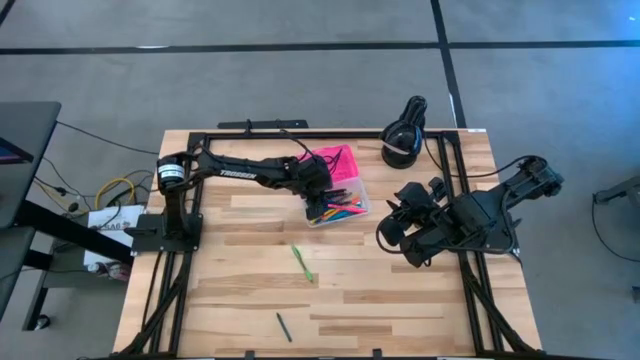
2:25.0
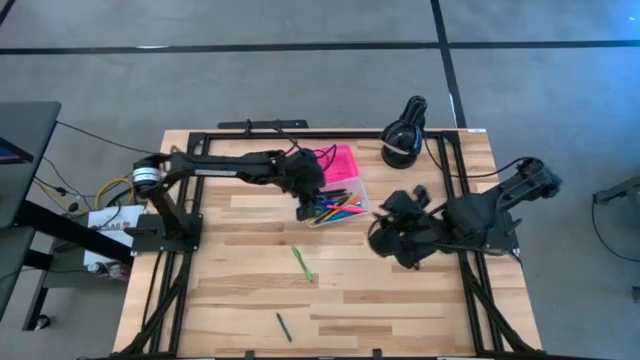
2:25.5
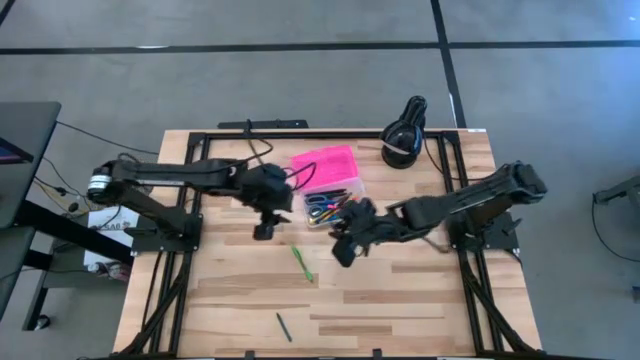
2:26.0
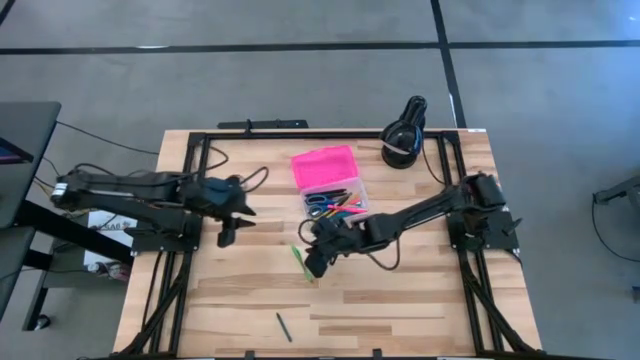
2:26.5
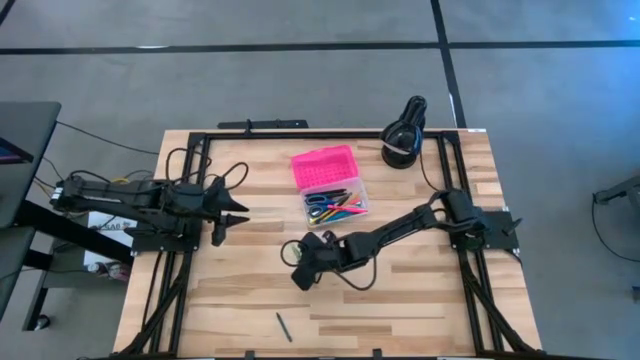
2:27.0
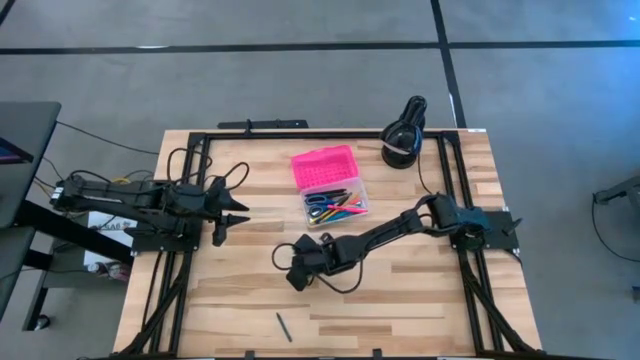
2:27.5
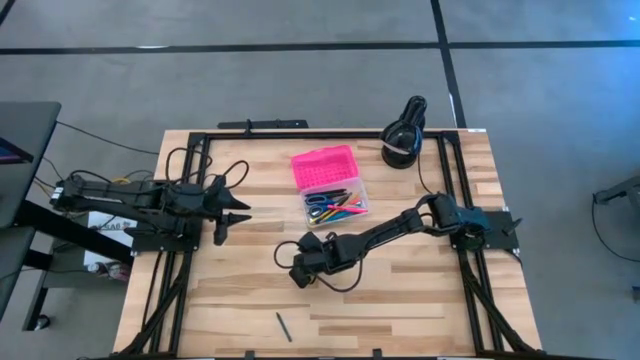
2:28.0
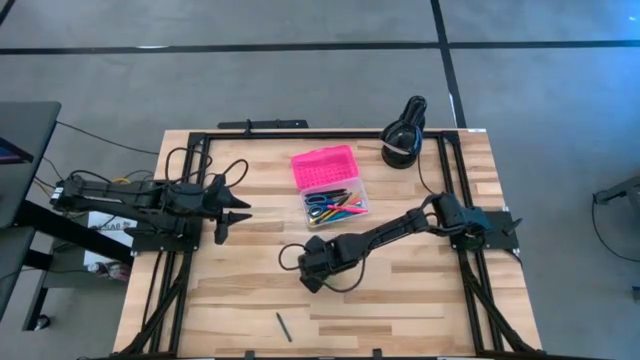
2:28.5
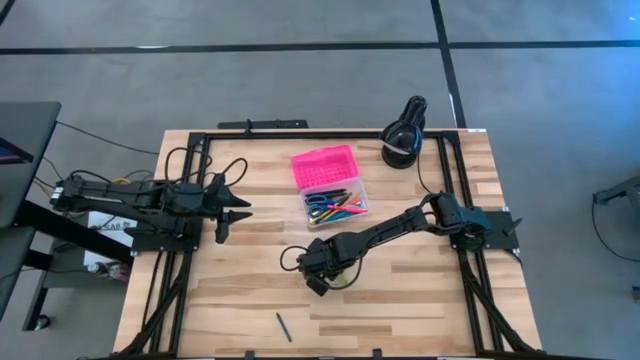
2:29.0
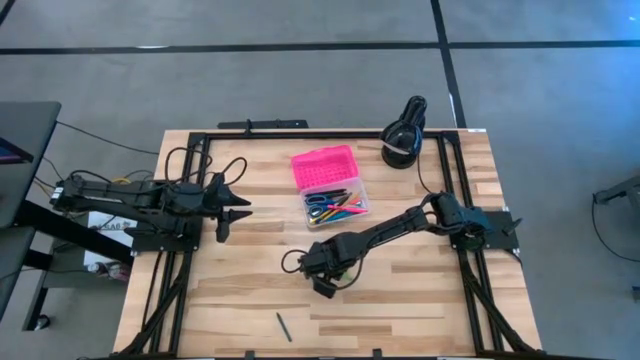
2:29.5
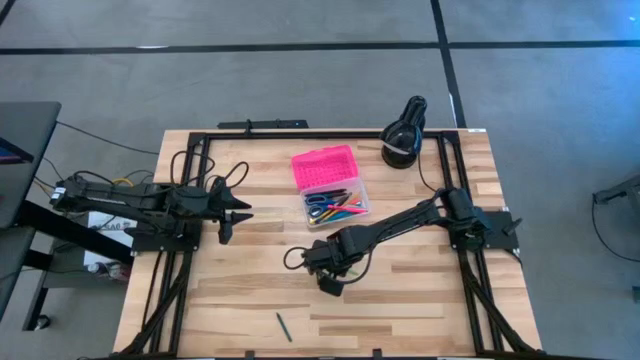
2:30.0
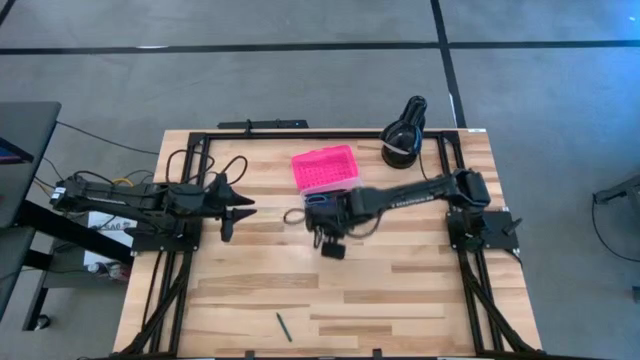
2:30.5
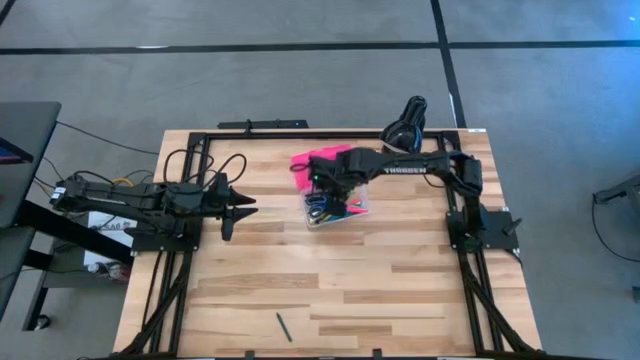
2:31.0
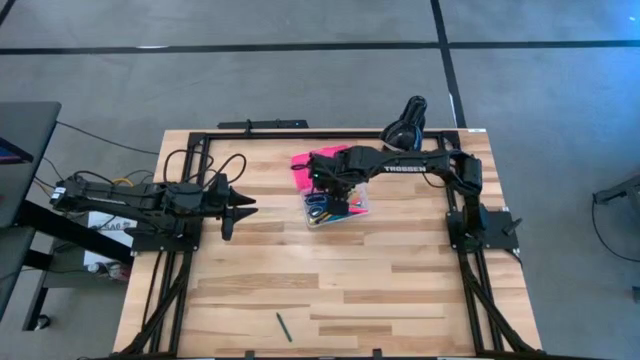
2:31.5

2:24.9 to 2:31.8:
Task: Pick & place school supplies into a supply box
Put the green pen into the pink supply box

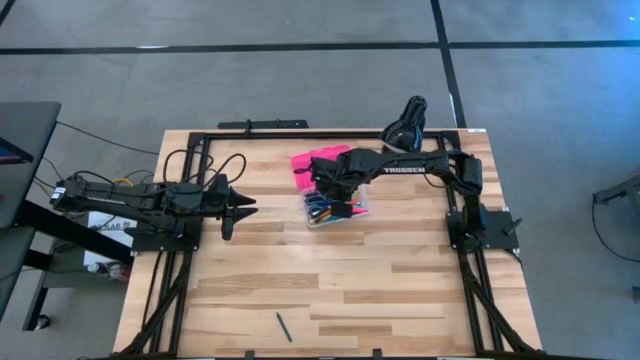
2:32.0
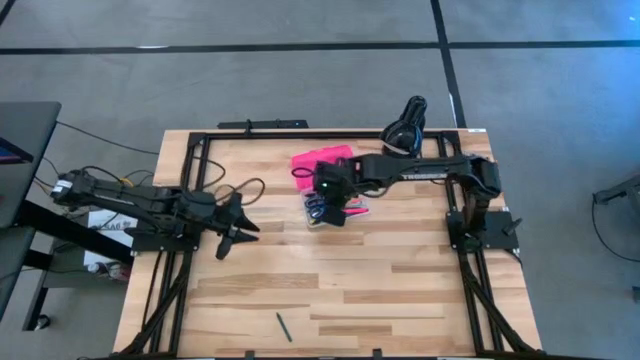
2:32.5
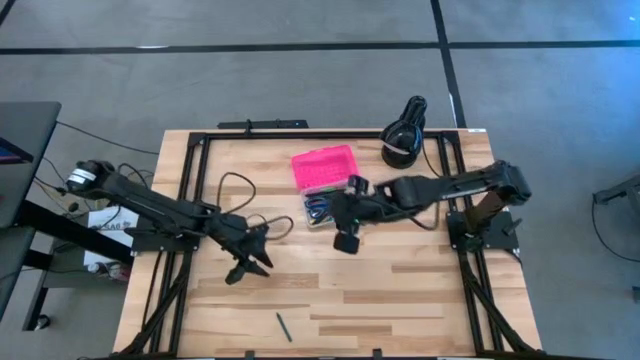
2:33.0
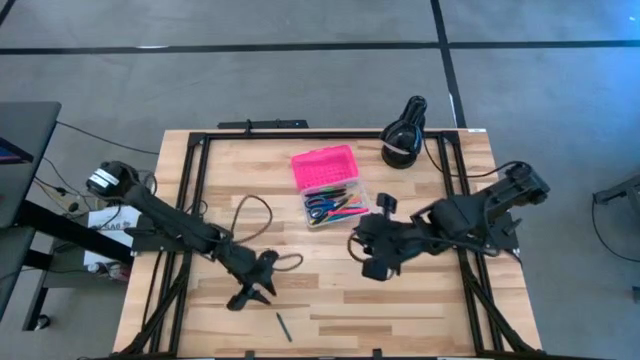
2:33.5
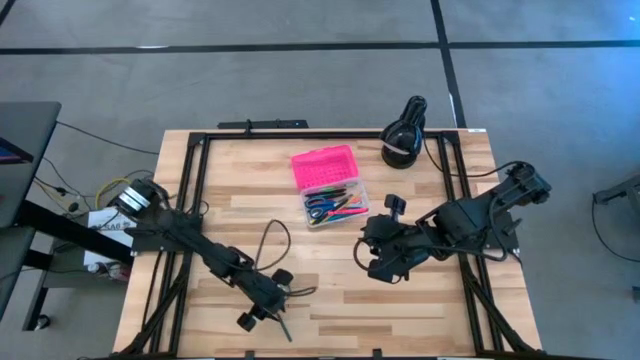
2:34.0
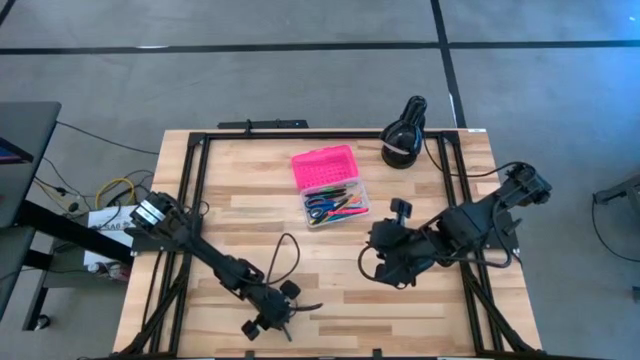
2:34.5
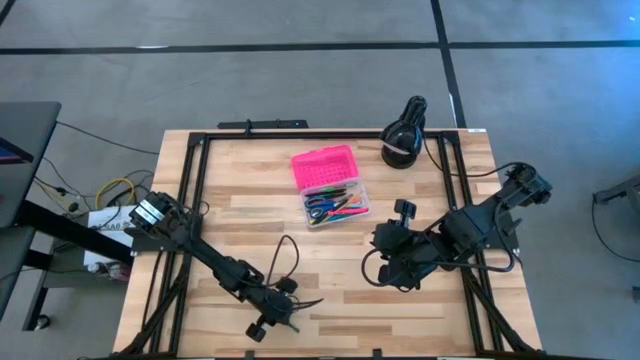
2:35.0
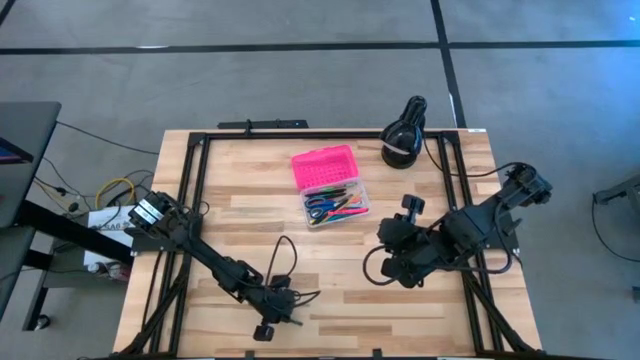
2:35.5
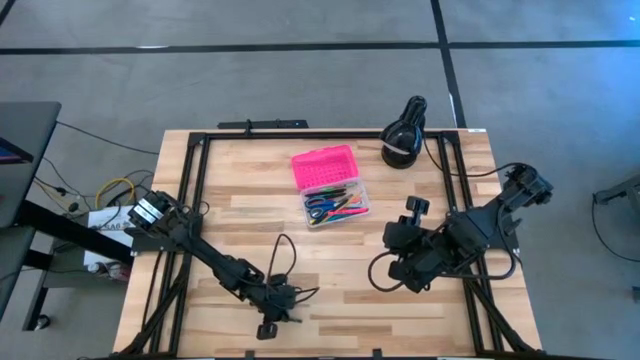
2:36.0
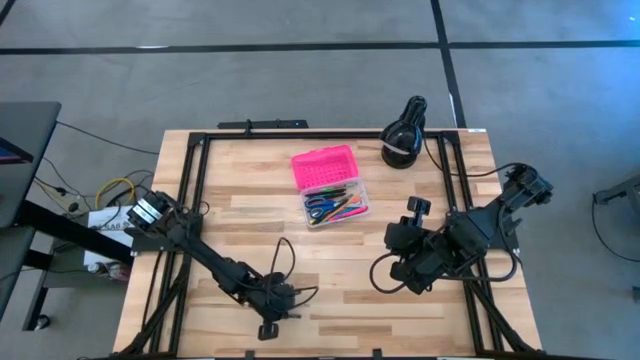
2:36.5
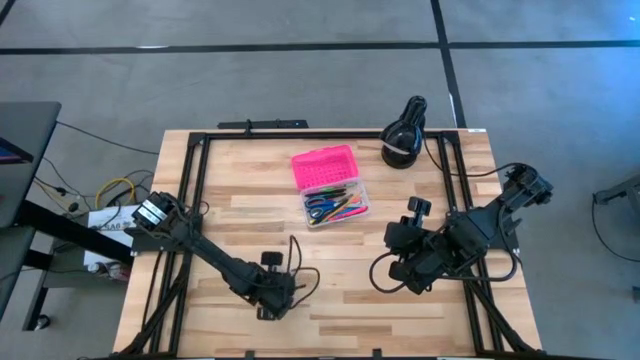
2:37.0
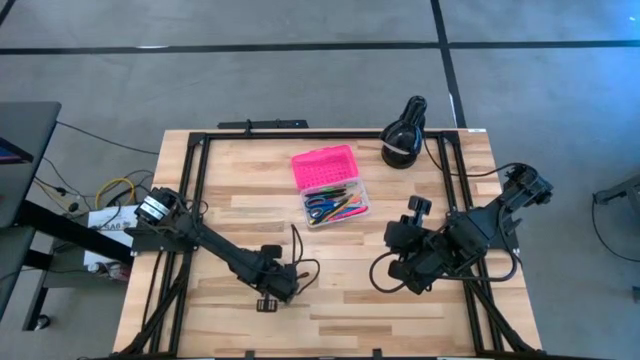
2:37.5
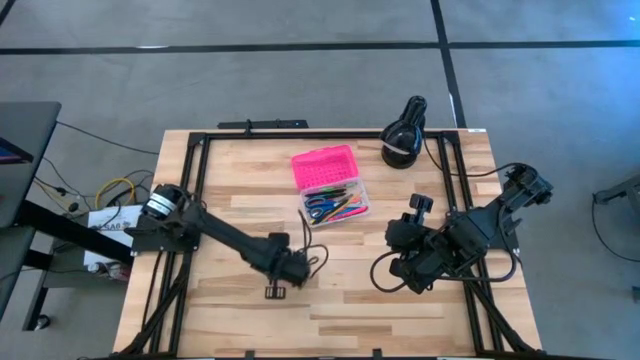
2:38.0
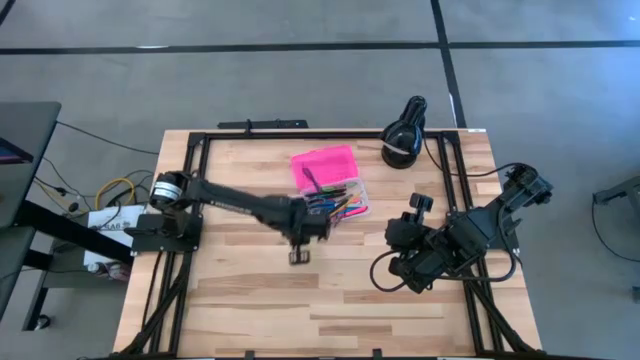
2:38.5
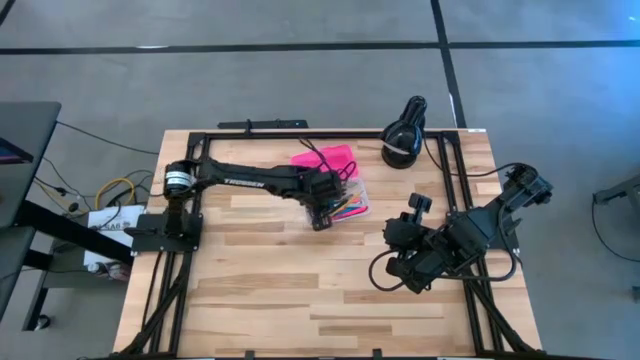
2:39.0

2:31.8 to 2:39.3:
Put the green crayon into the pink supply box

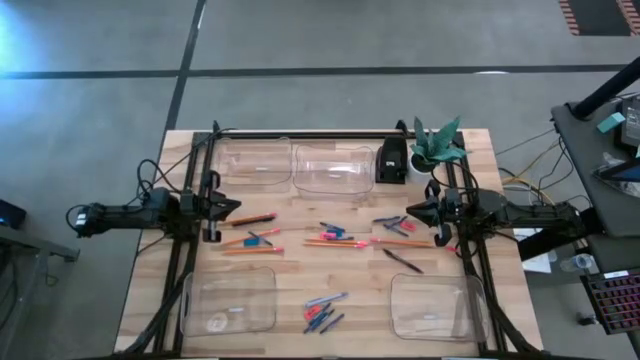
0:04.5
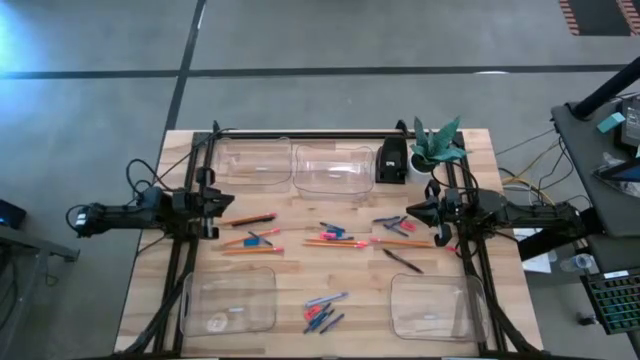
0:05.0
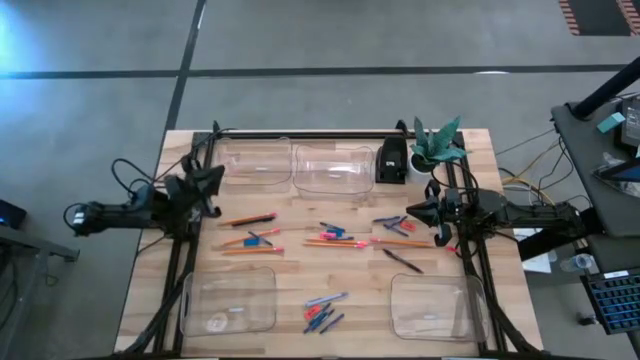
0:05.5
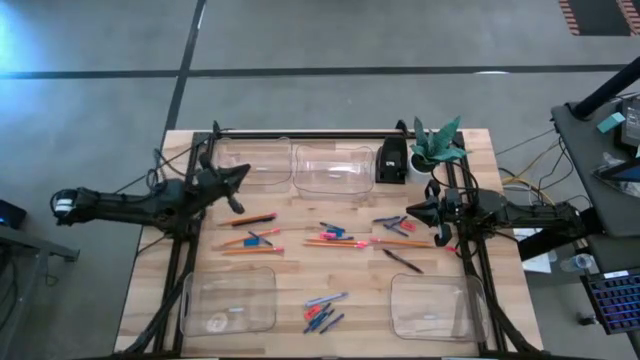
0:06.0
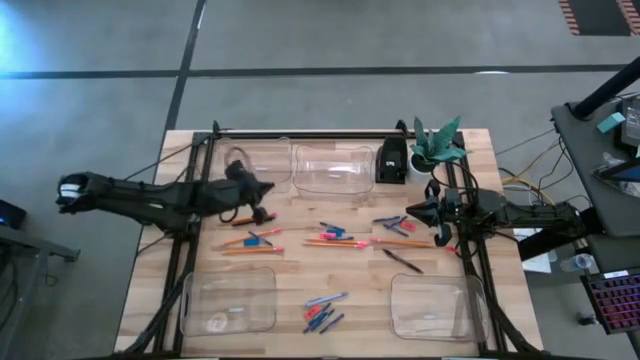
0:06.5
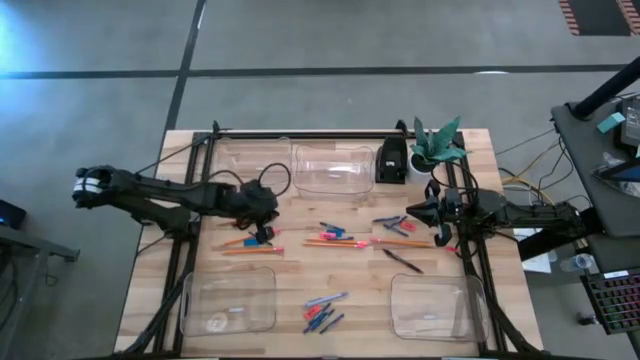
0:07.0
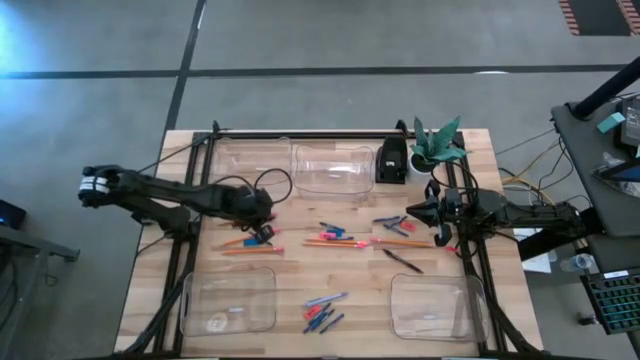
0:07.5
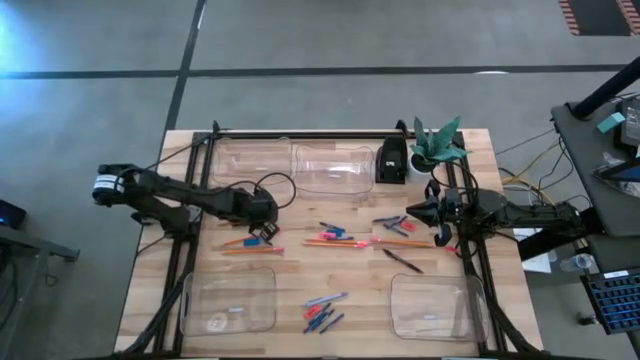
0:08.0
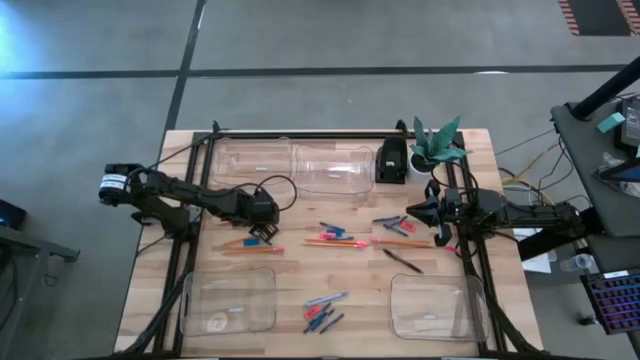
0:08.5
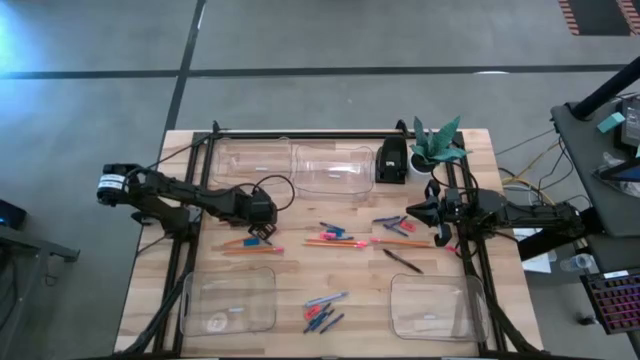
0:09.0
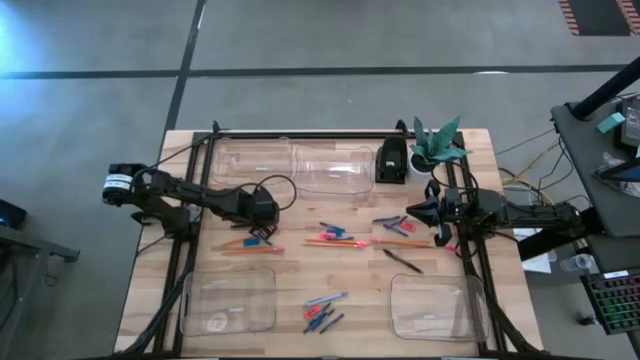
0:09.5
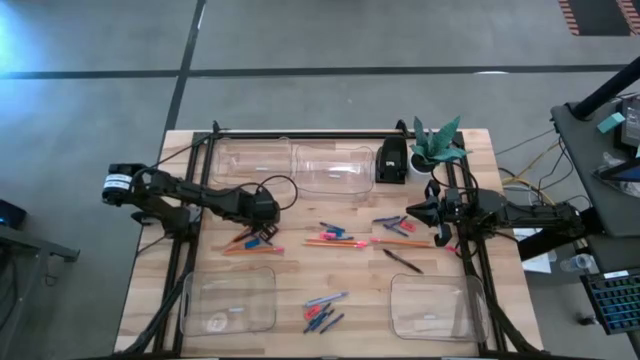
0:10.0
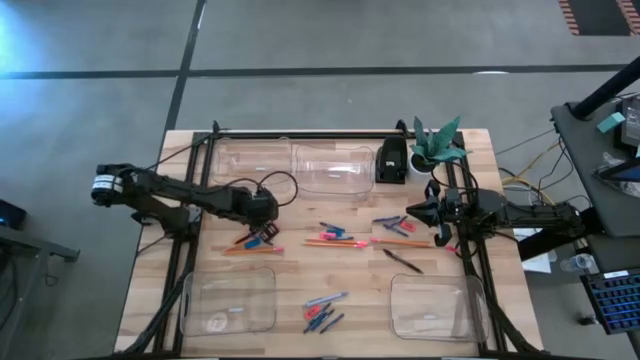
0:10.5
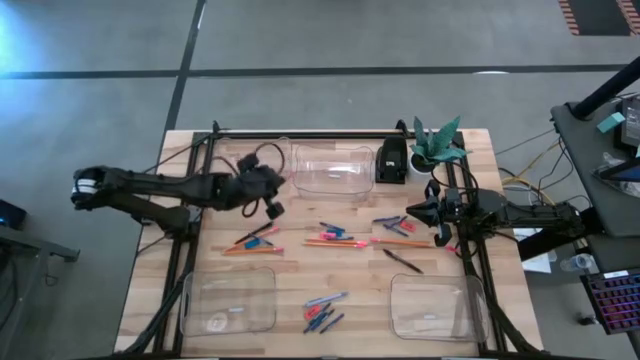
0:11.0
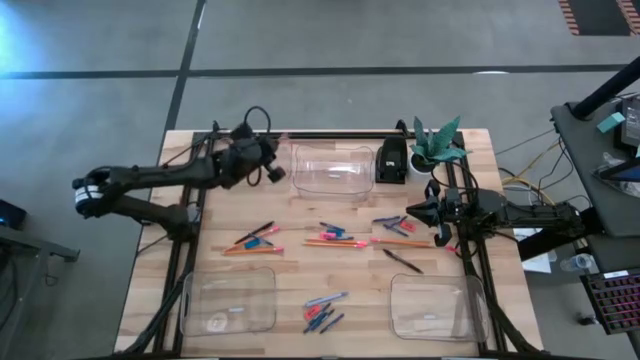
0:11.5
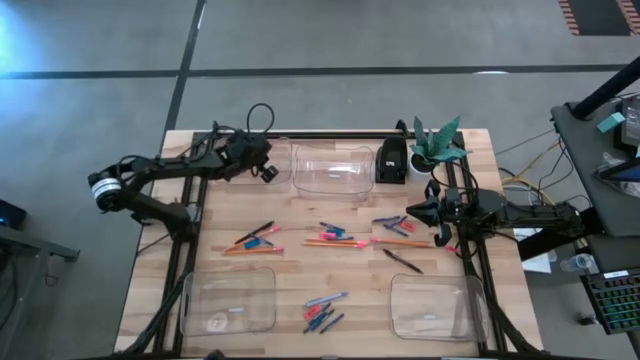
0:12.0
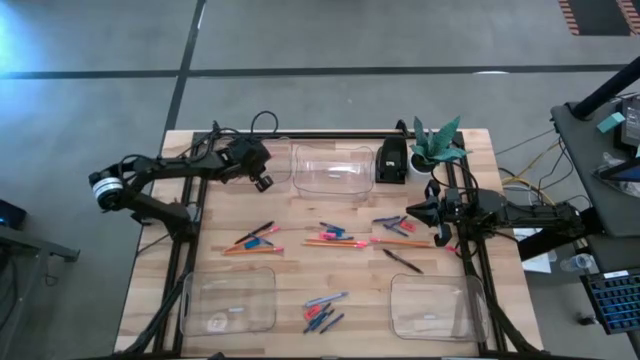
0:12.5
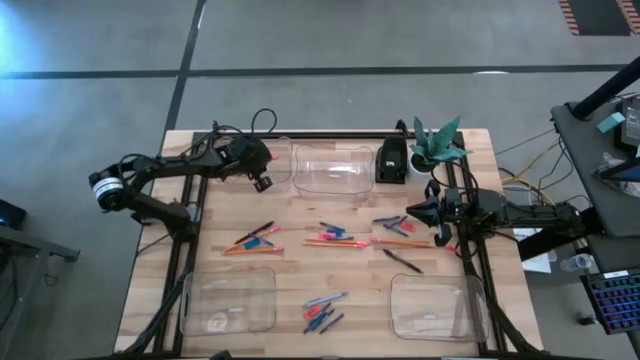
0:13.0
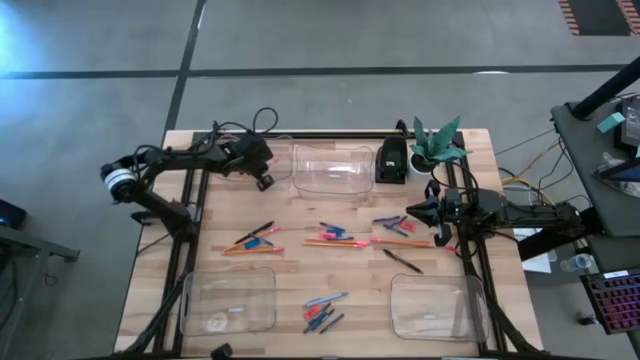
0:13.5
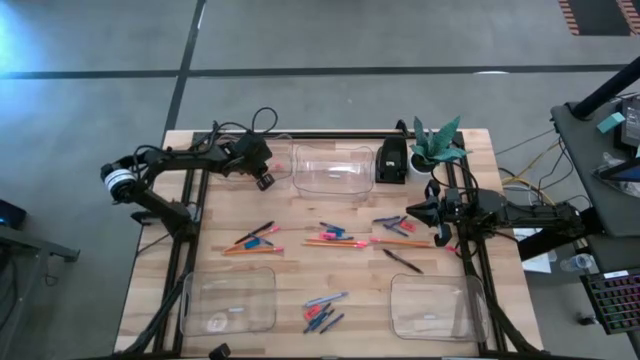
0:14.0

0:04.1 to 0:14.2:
Task: Sort crayons/erasers/pens/pencils in bins
Put the orange pencil into the top left transparent bin
